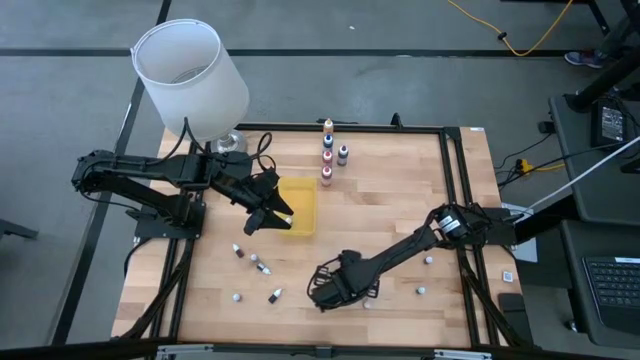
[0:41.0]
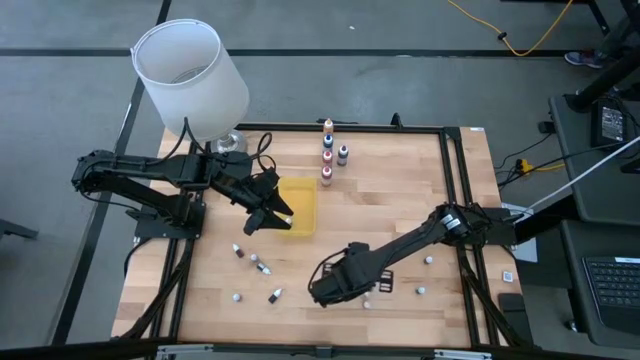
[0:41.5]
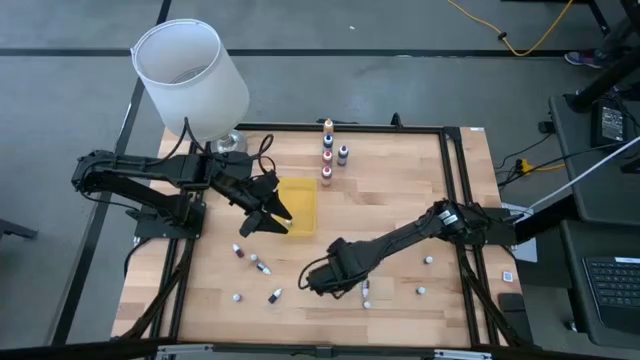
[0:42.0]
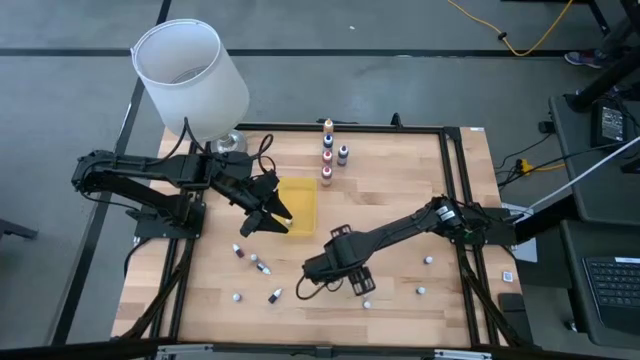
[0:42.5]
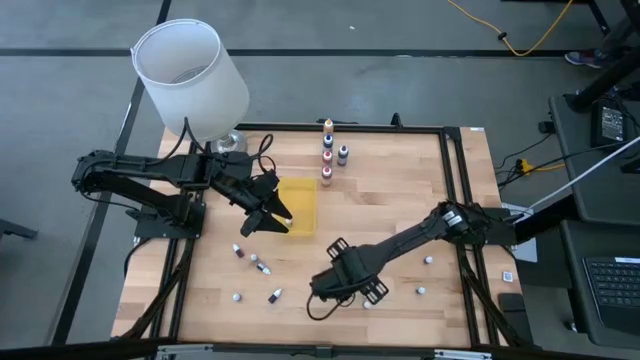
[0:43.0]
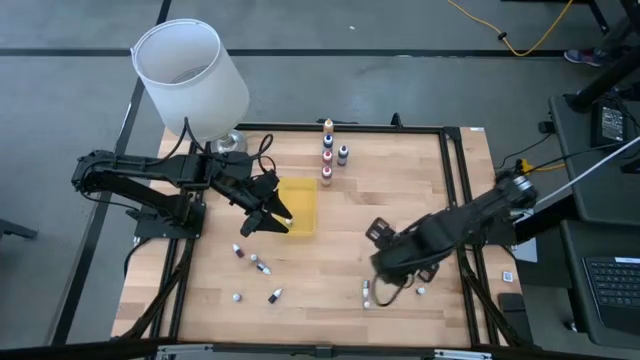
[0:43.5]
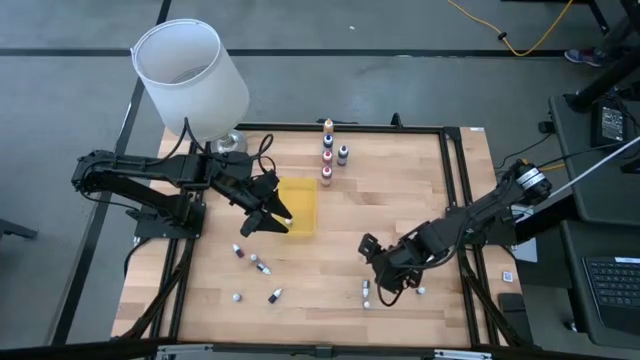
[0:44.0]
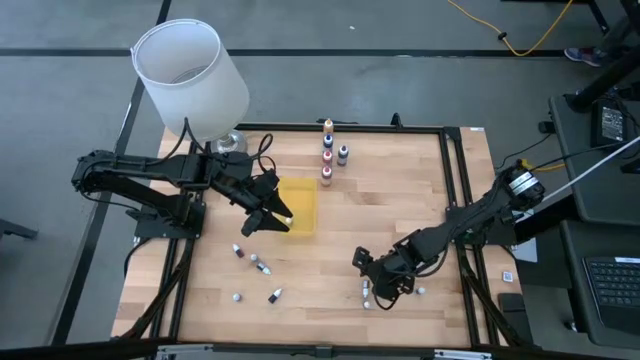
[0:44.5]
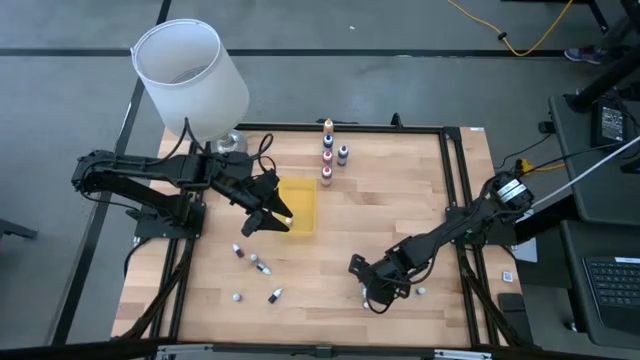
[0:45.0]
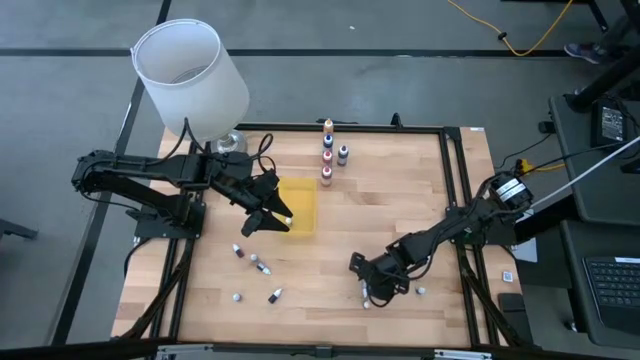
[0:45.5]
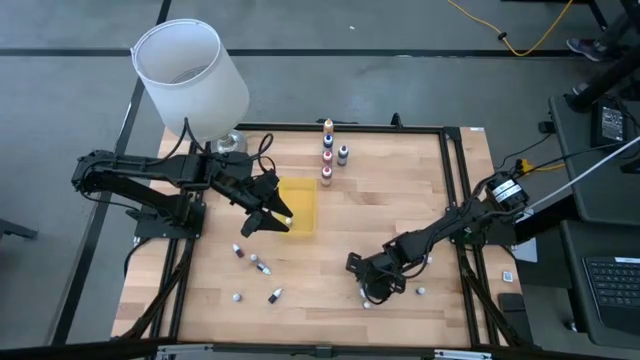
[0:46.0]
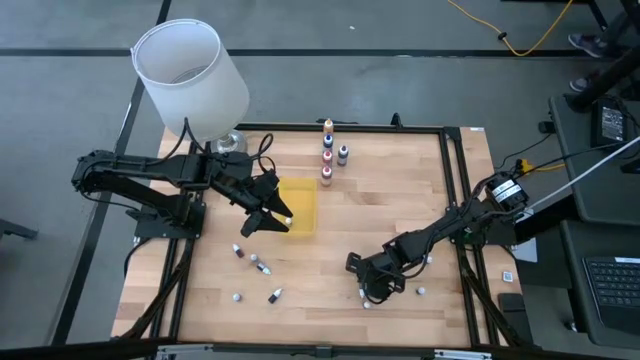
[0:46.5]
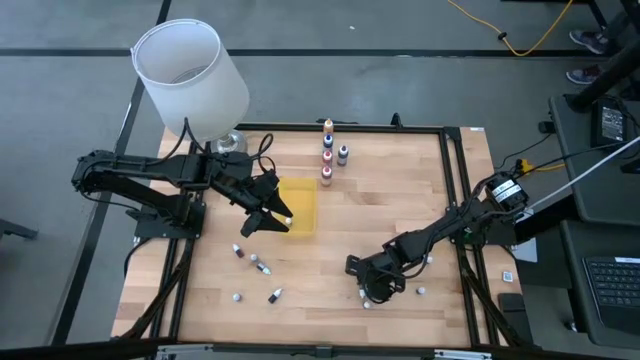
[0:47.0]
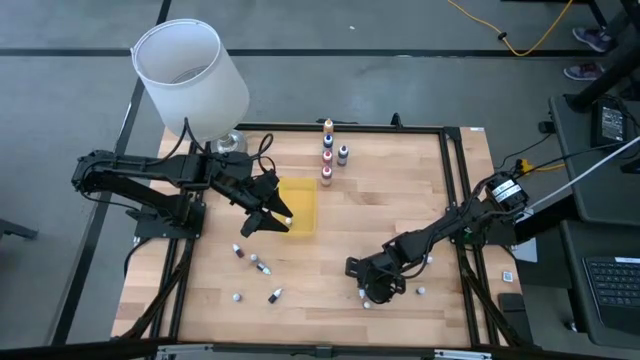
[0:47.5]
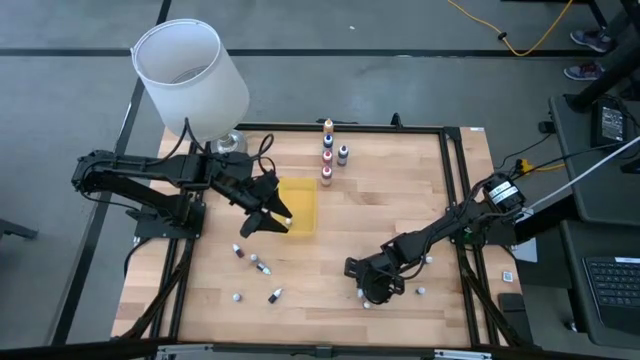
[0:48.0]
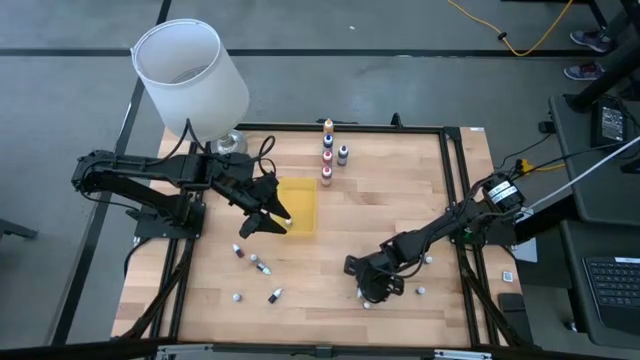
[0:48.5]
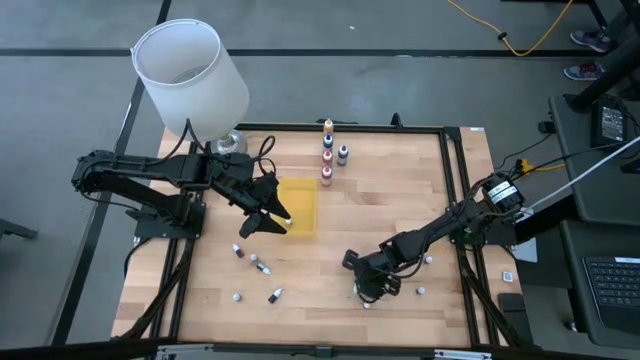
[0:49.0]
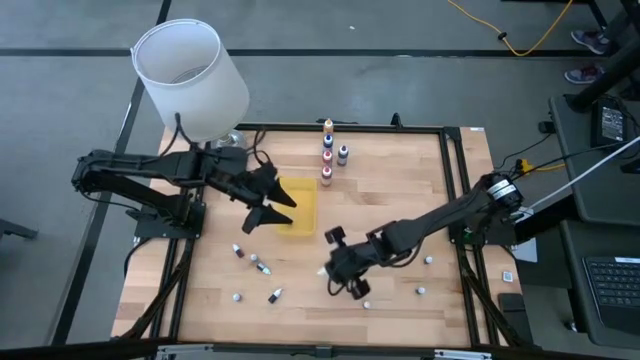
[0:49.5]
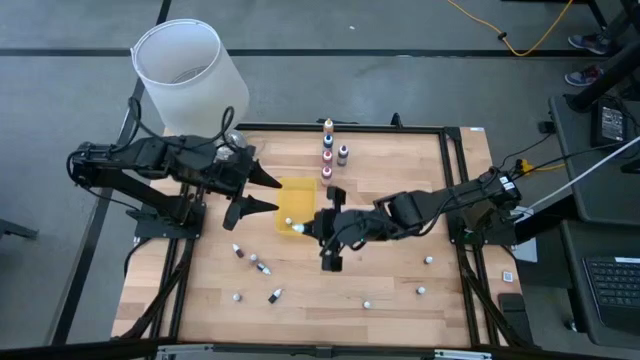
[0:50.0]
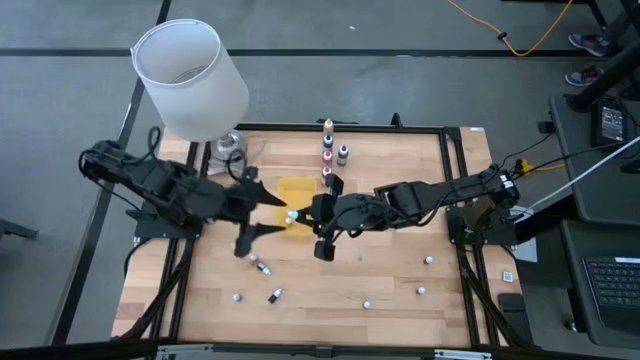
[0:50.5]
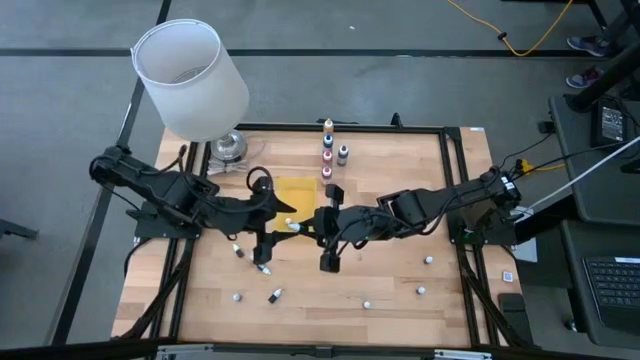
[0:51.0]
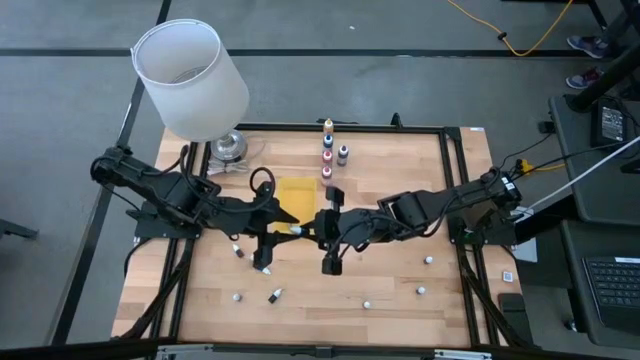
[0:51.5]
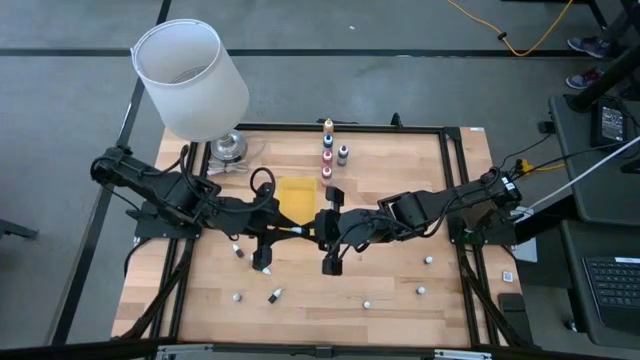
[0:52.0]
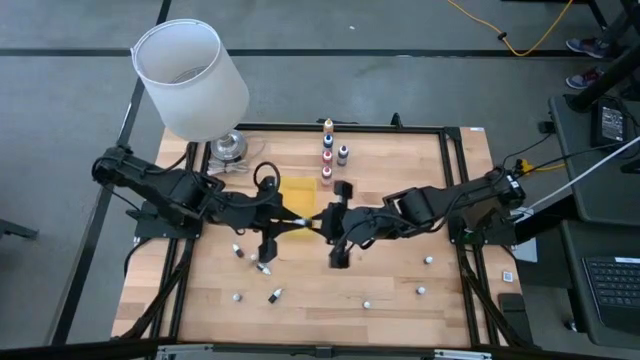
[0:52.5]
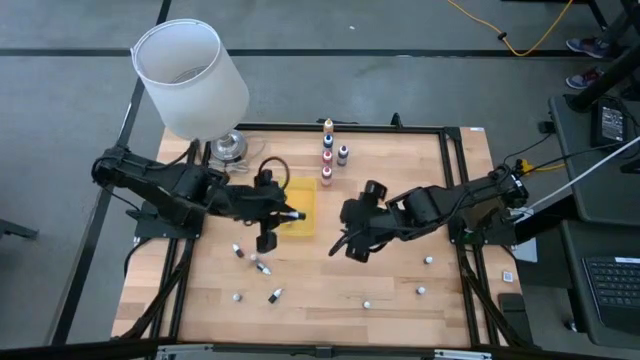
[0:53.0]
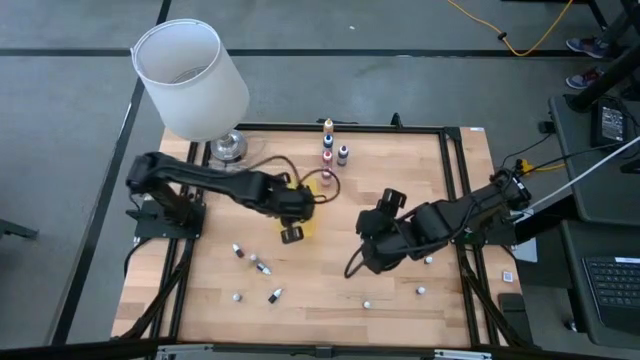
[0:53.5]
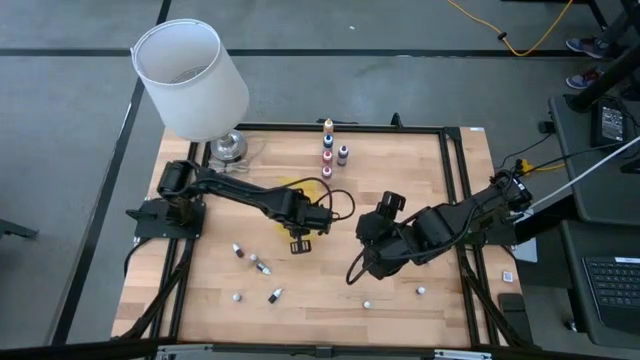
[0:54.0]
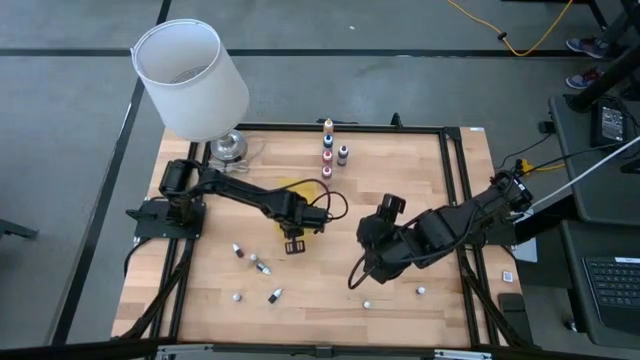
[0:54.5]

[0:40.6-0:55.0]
Task: Pick & Place food coloring
Put the small dark green bottle into the yellow bin
